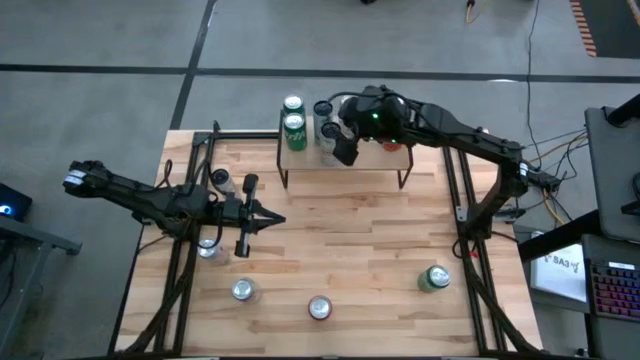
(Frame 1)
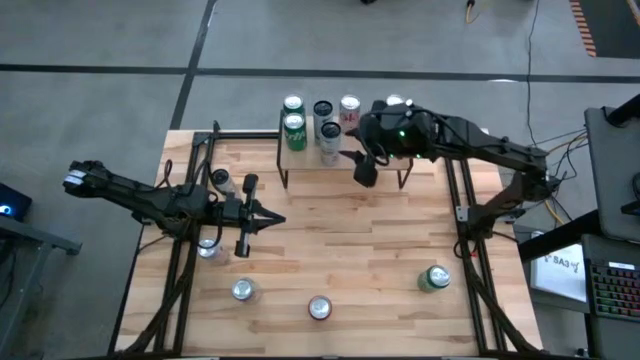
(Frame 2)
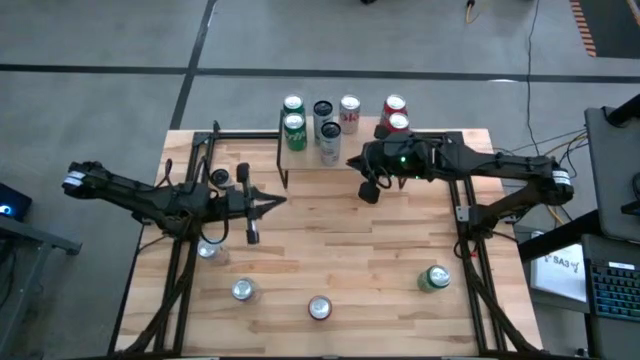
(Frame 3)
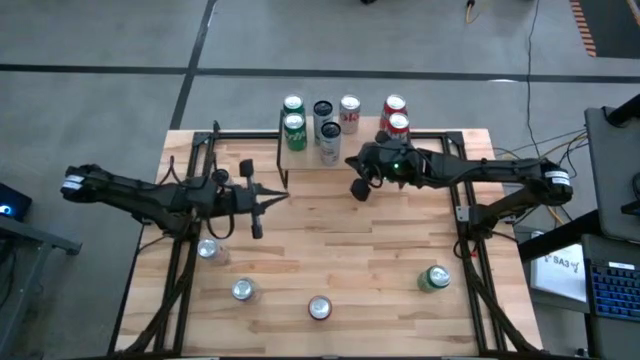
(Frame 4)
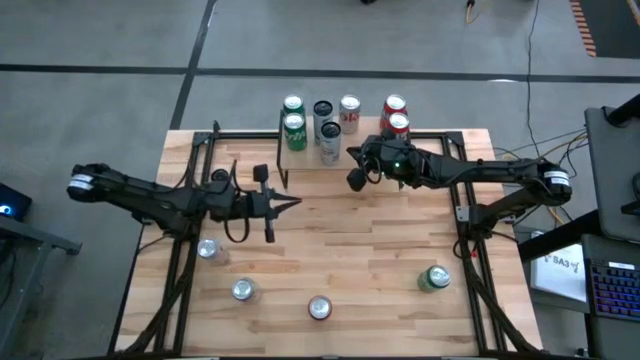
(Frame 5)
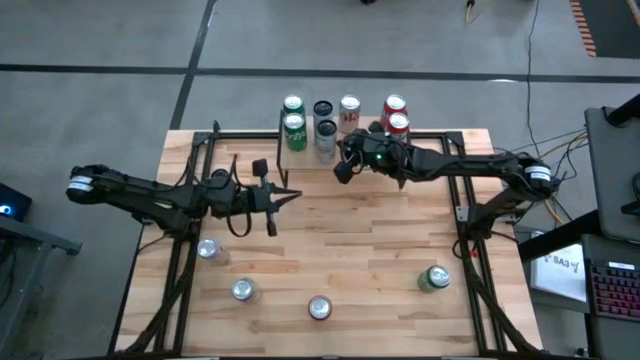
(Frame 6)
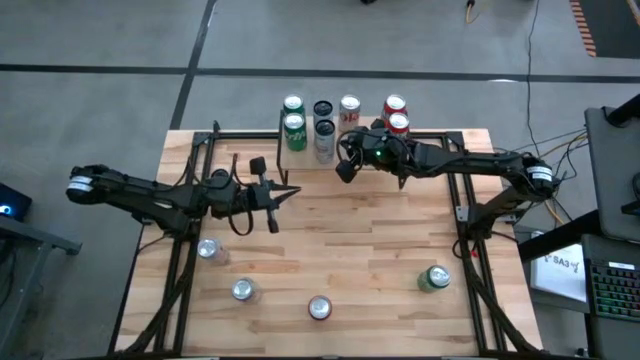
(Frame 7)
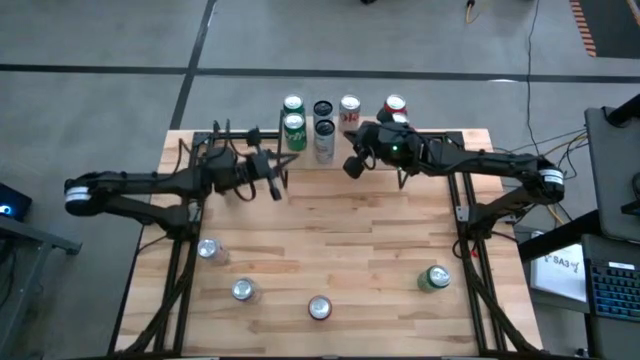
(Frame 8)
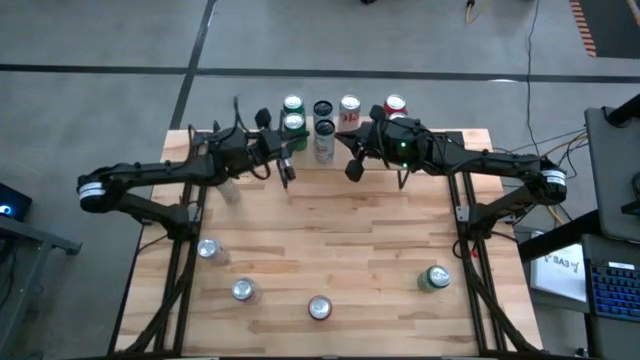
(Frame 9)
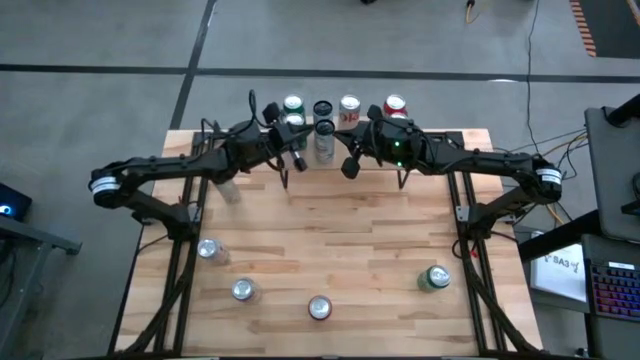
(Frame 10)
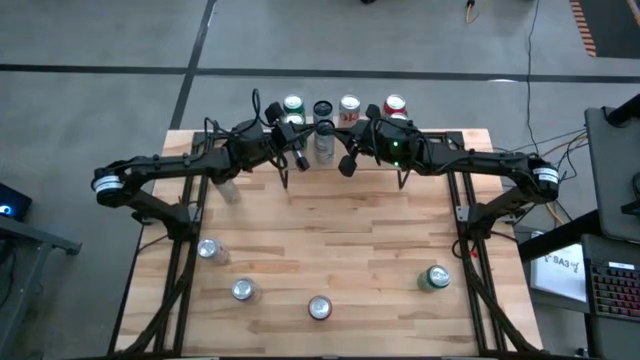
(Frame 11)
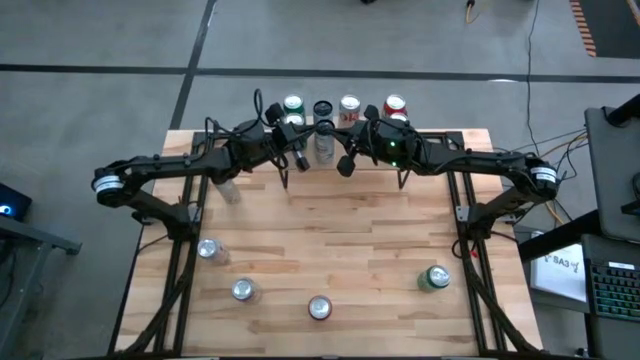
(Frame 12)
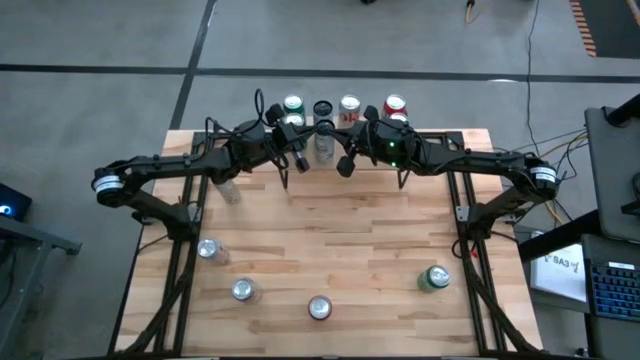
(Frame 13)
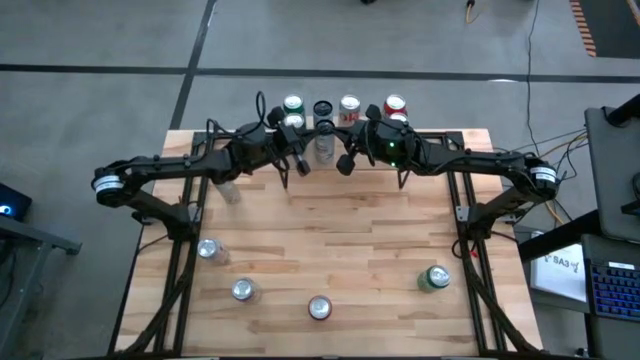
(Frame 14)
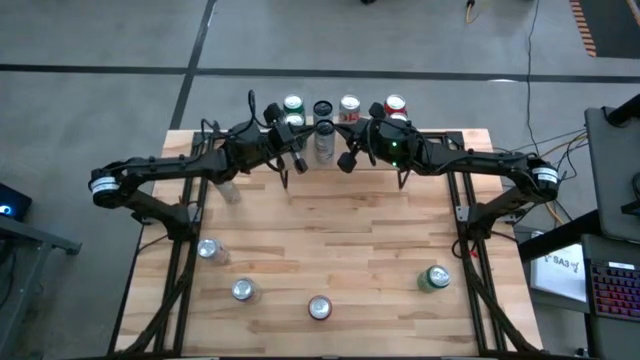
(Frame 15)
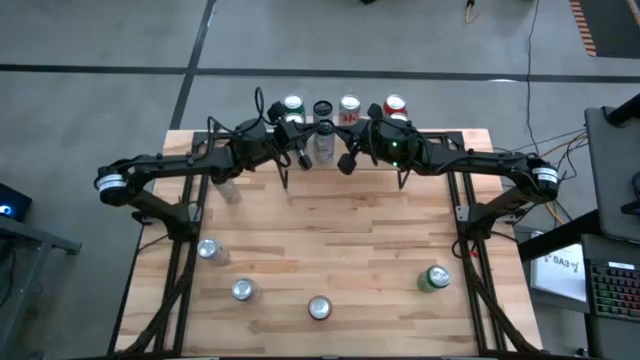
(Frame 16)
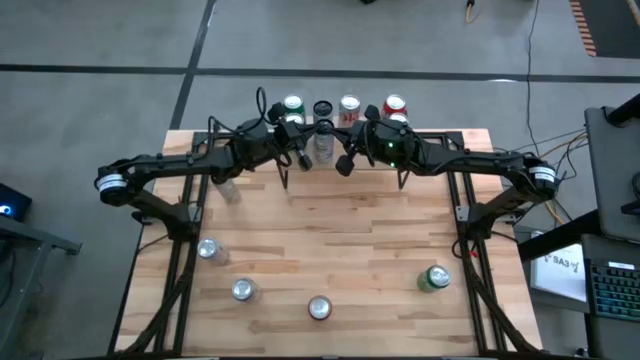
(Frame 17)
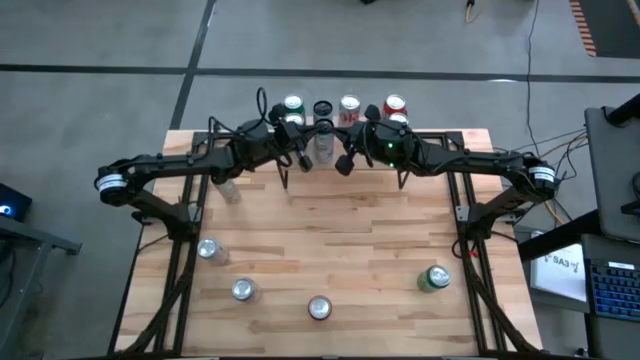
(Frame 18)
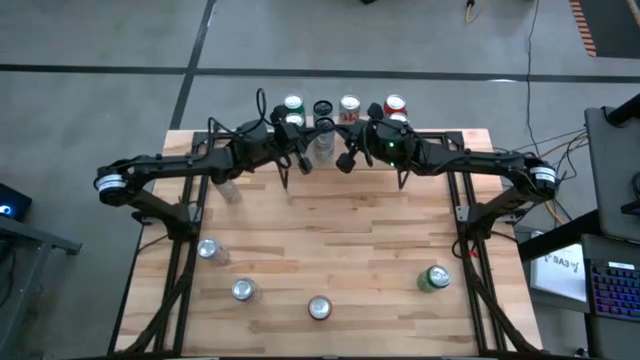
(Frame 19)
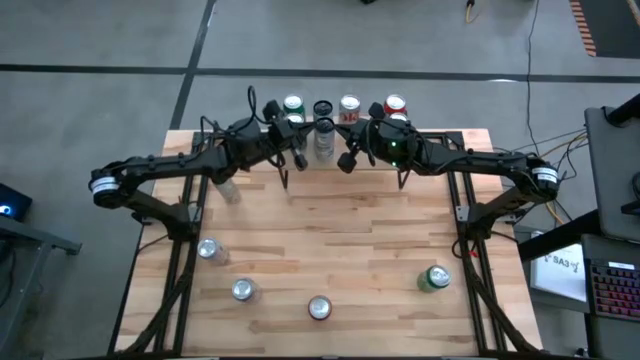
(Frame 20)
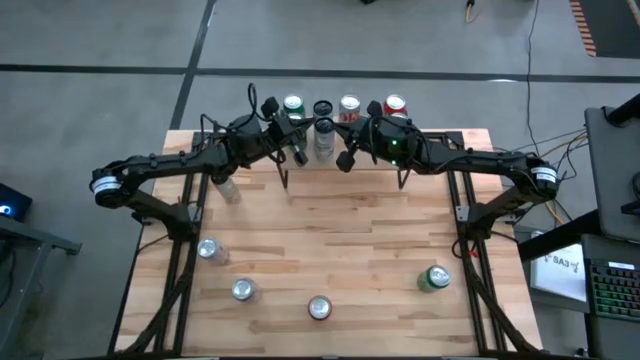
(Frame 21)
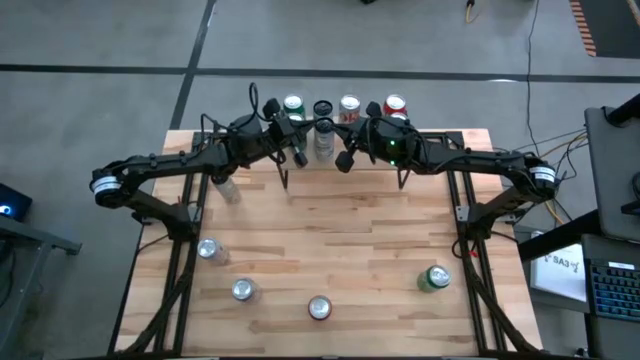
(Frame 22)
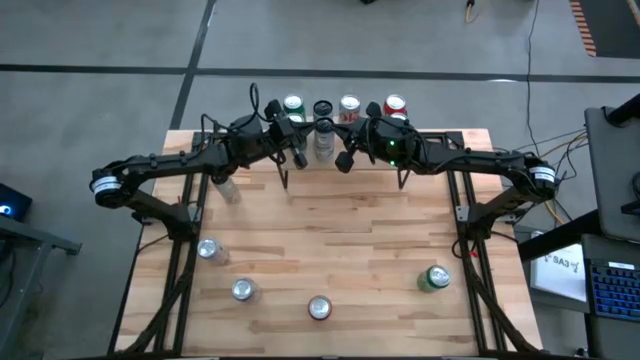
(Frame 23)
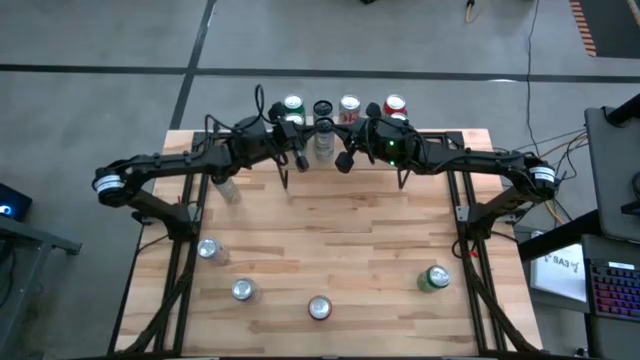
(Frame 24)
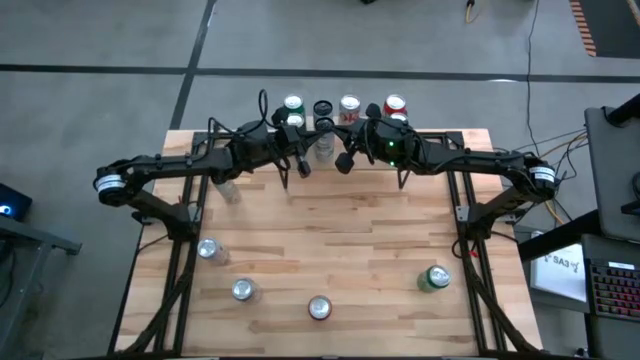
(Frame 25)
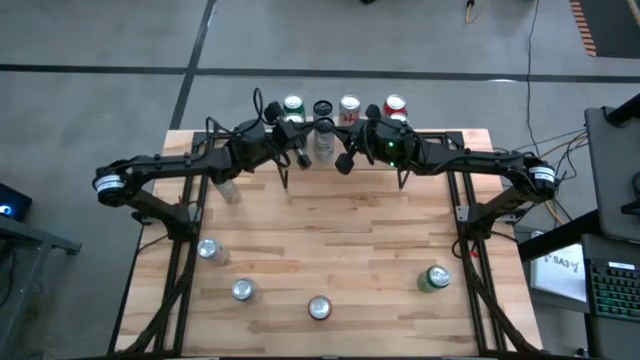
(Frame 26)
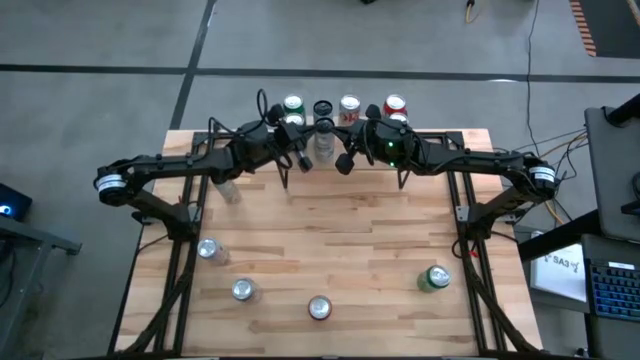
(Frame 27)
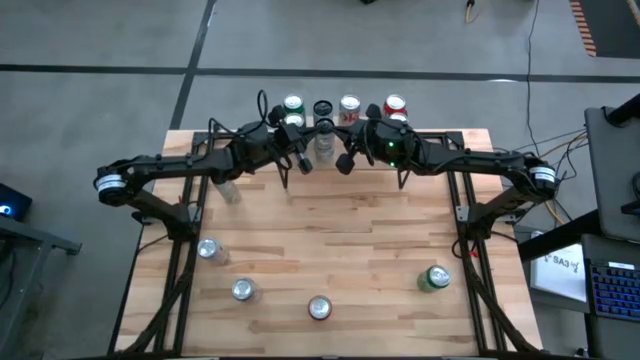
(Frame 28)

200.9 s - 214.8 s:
Task: Place canned beverage on shelf
Put the white blue soda can on the shelf aligned with the other white blue soda can
